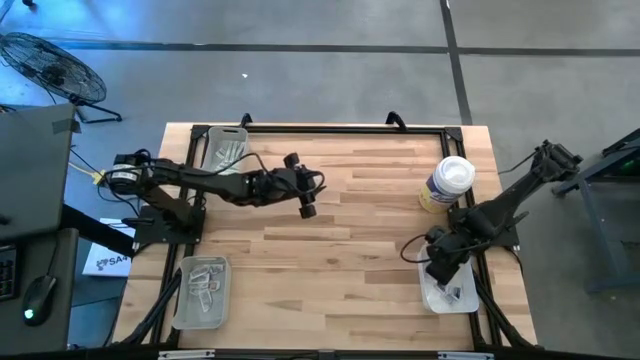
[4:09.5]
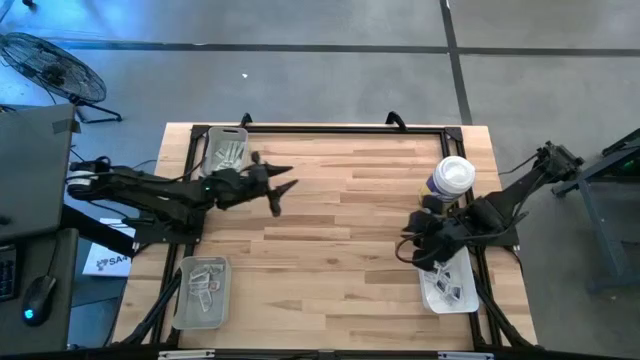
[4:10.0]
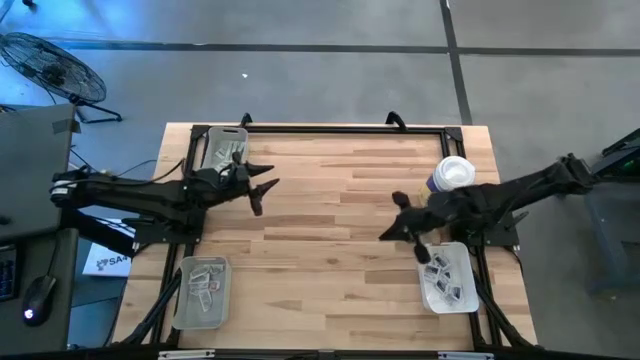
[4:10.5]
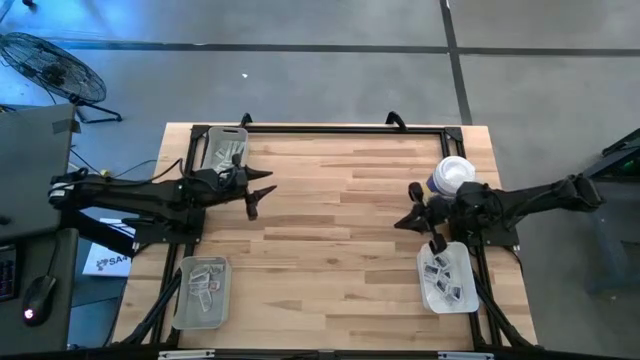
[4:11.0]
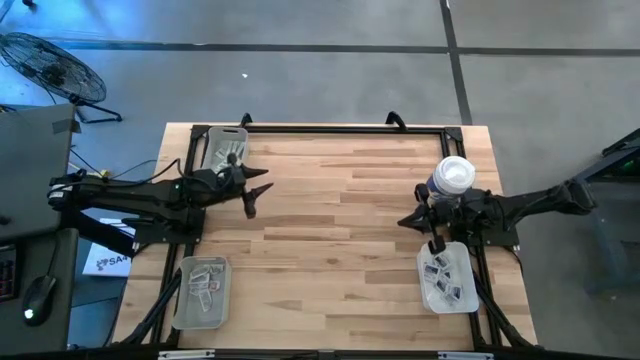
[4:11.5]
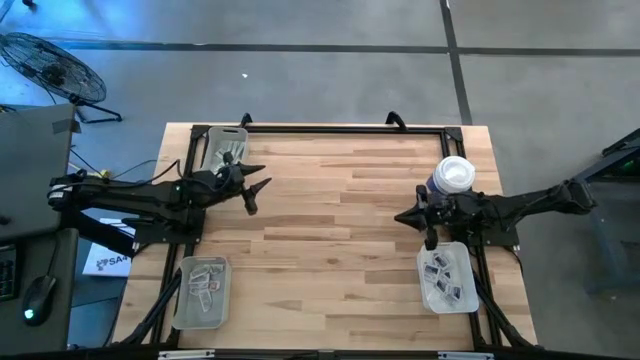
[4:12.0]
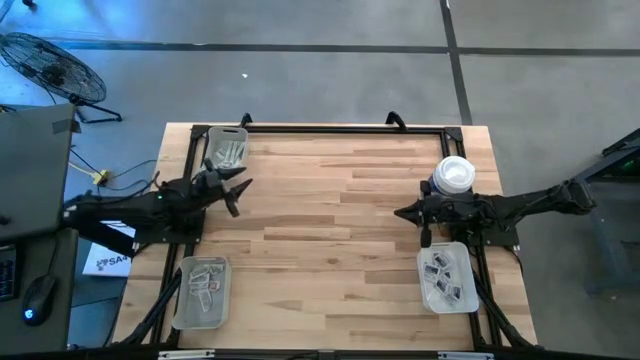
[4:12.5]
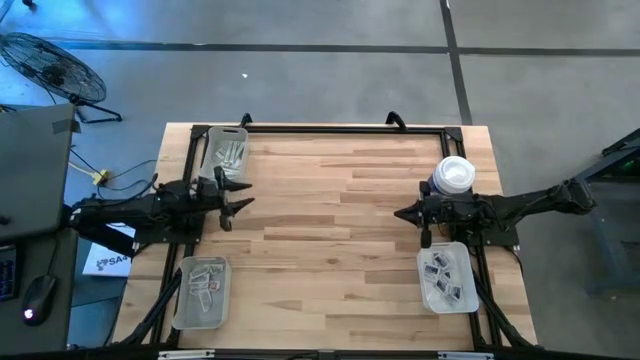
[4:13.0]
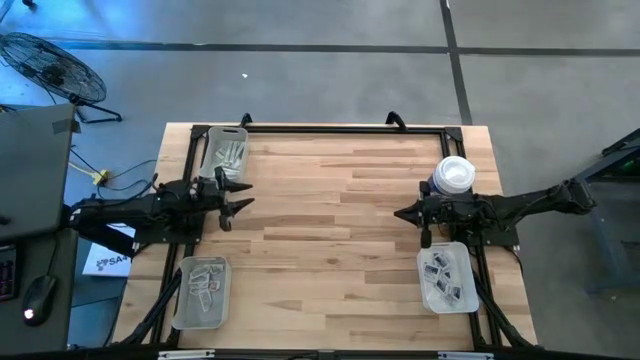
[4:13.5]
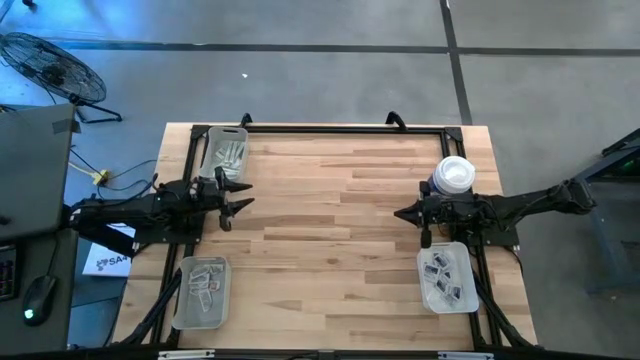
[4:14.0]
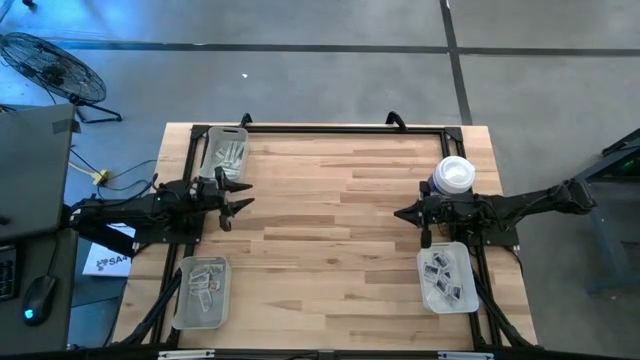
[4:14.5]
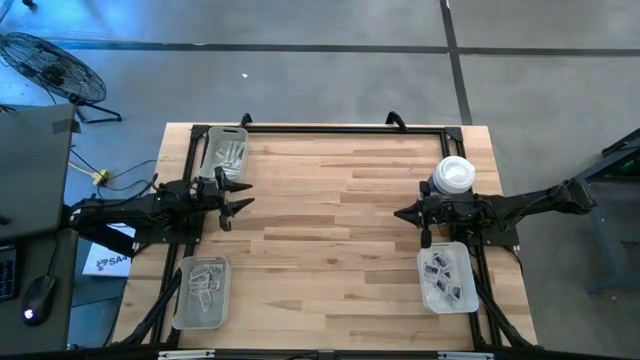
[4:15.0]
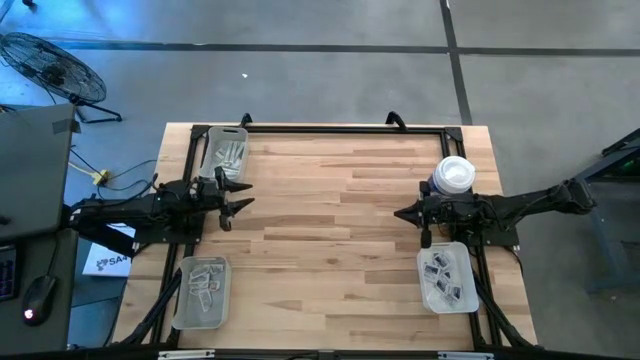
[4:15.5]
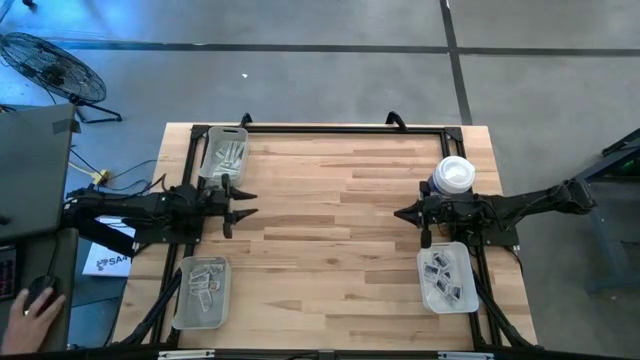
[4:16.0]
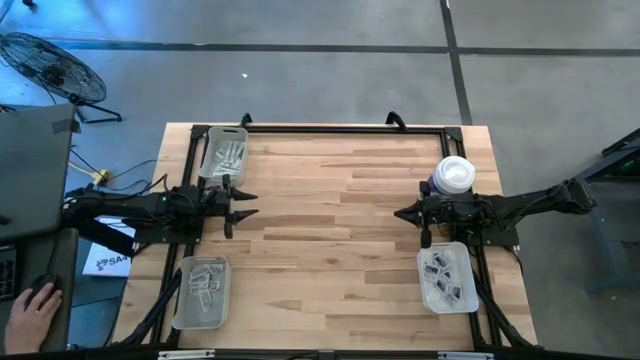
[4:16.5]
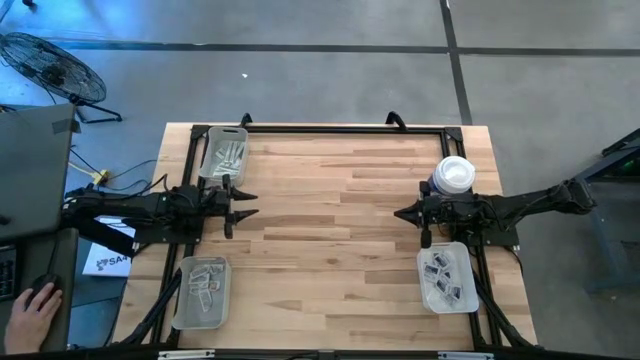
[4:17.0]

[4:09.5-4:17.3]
Task: Pick & Place First Aid Supplies
Return to Home Position
